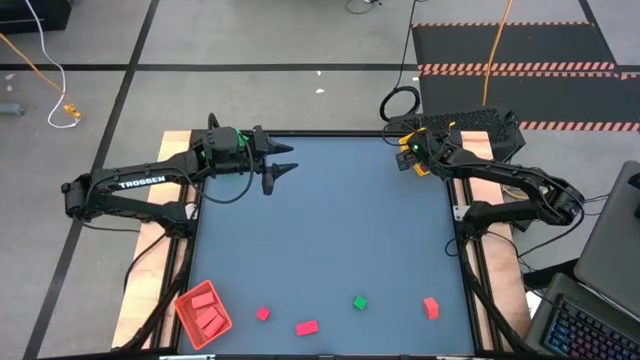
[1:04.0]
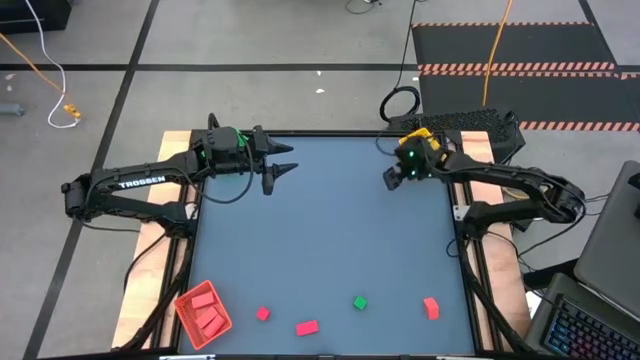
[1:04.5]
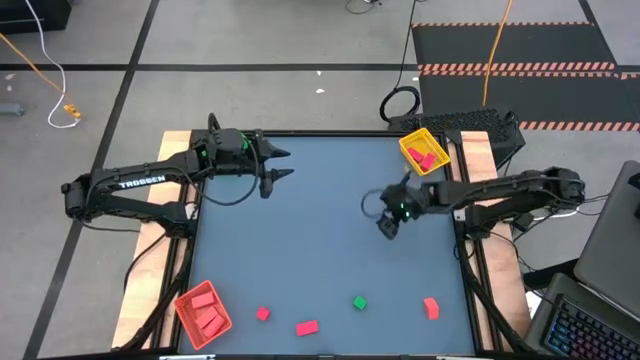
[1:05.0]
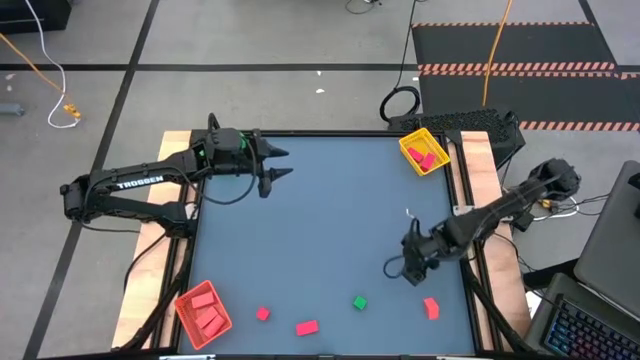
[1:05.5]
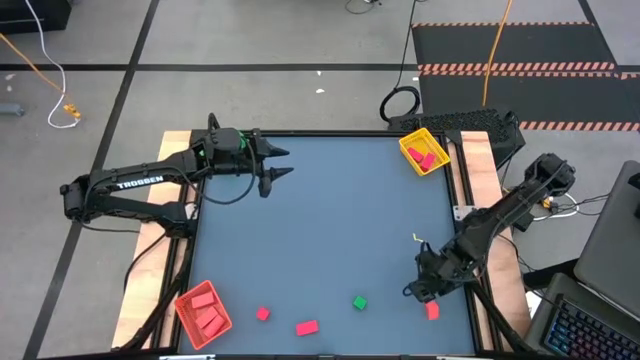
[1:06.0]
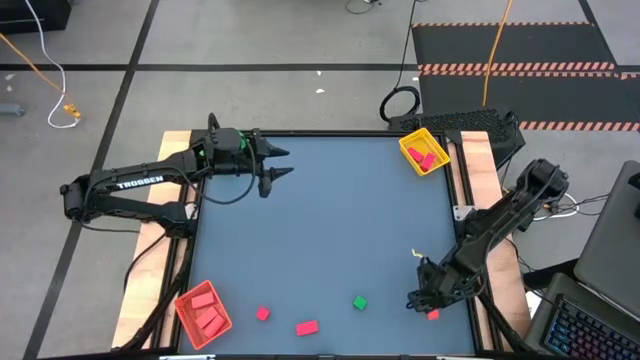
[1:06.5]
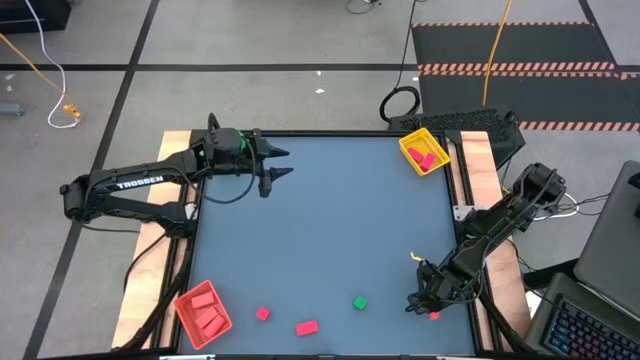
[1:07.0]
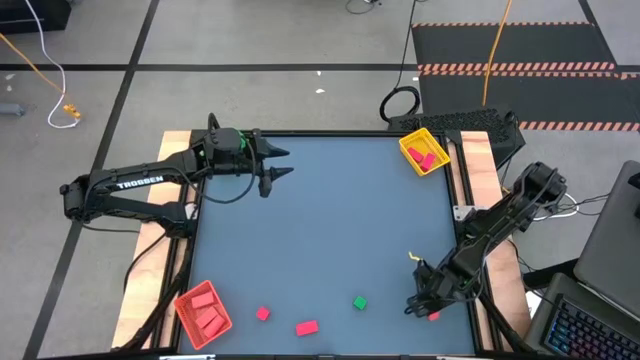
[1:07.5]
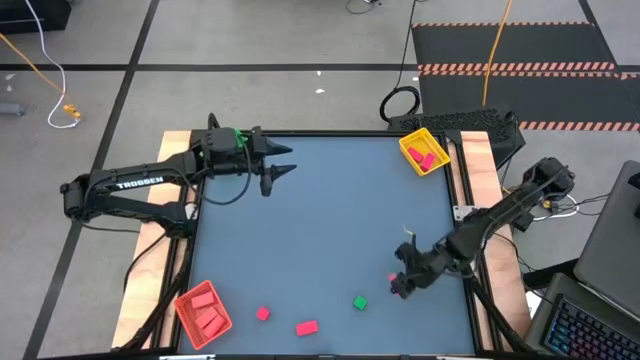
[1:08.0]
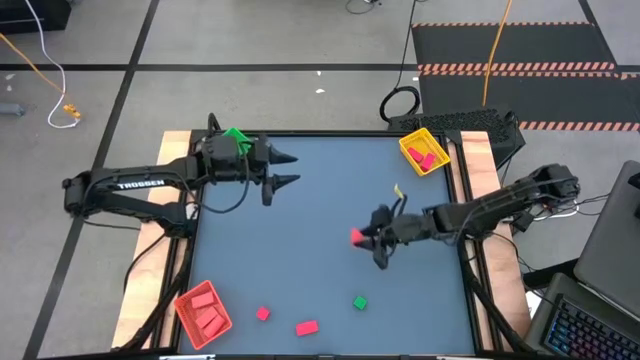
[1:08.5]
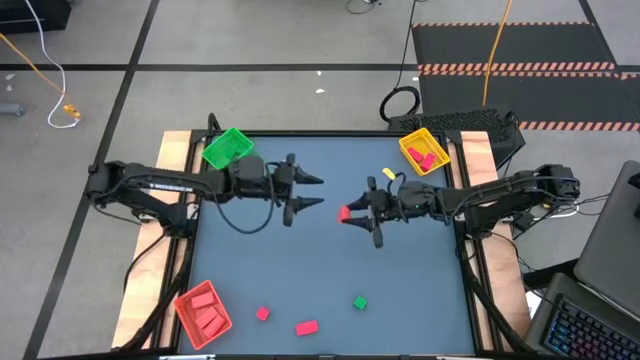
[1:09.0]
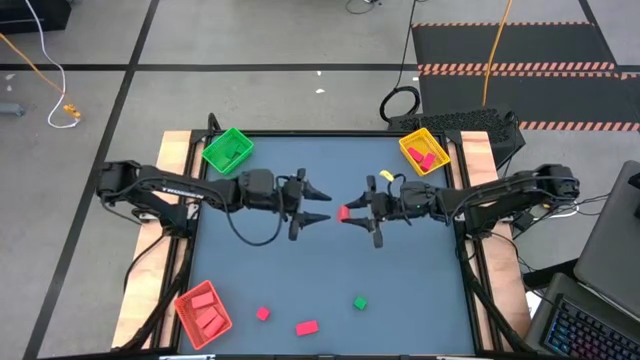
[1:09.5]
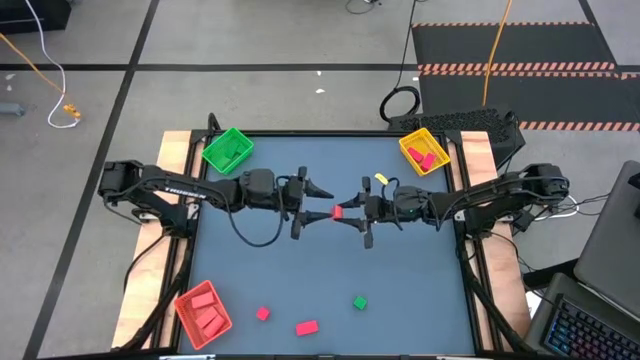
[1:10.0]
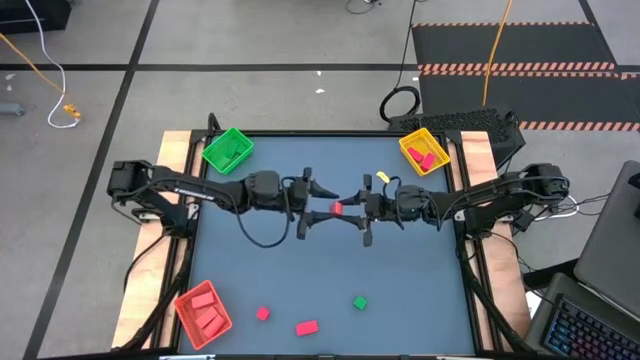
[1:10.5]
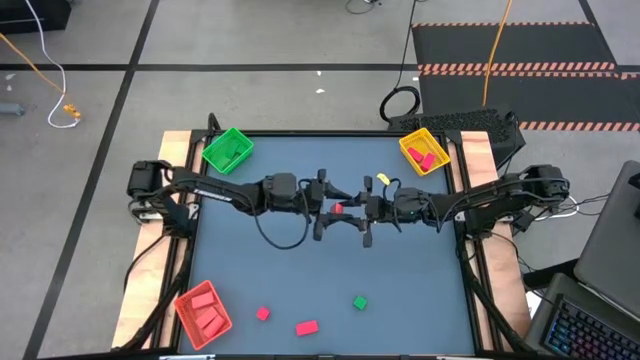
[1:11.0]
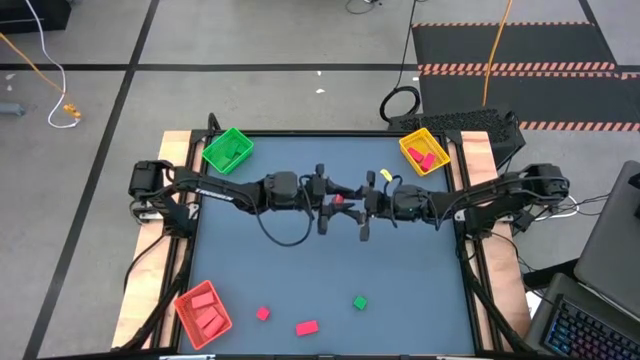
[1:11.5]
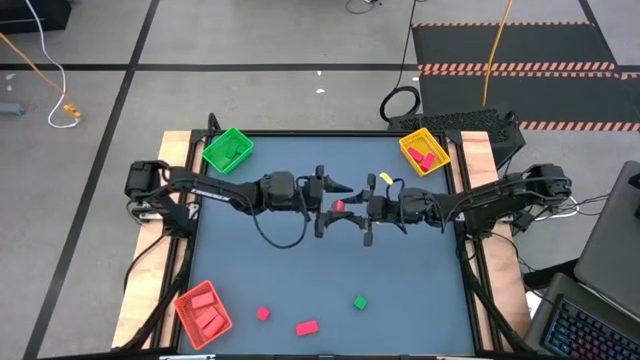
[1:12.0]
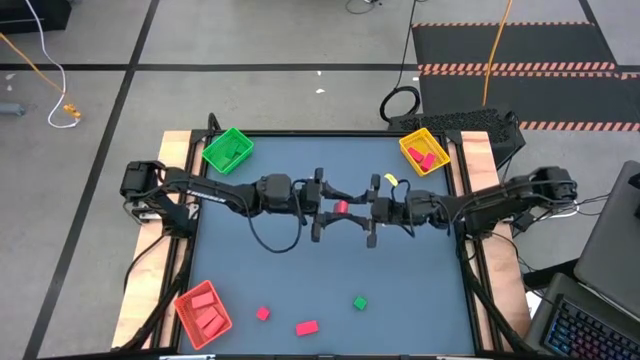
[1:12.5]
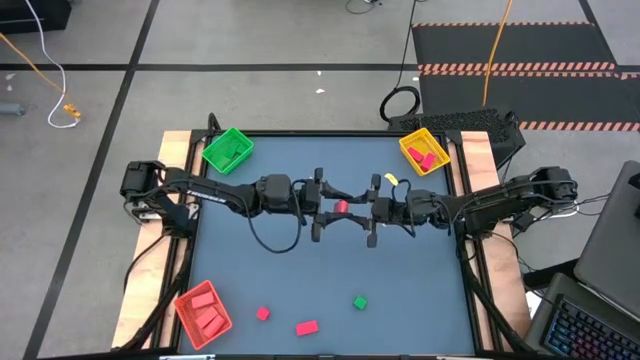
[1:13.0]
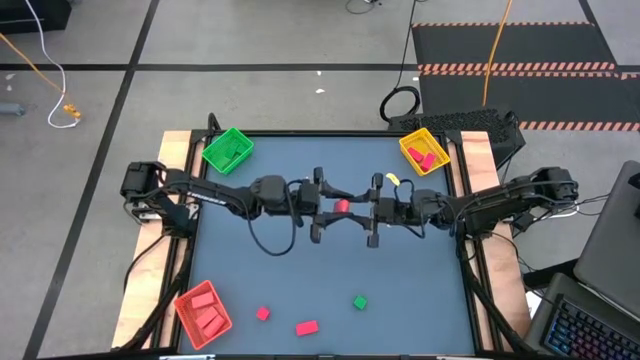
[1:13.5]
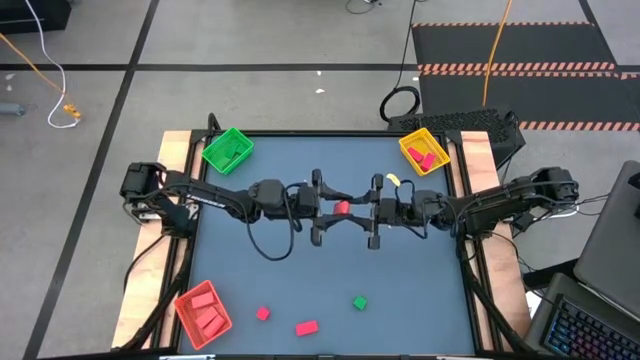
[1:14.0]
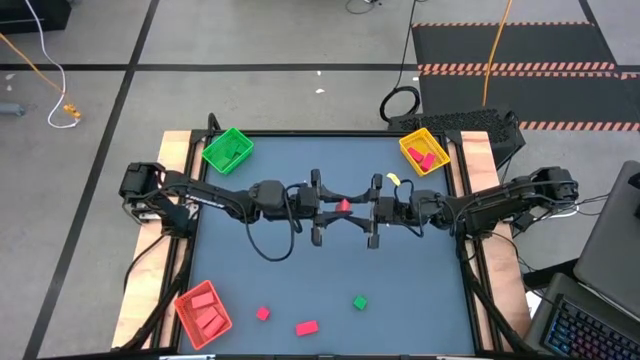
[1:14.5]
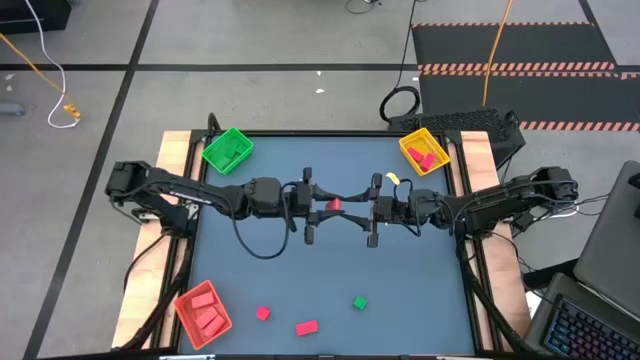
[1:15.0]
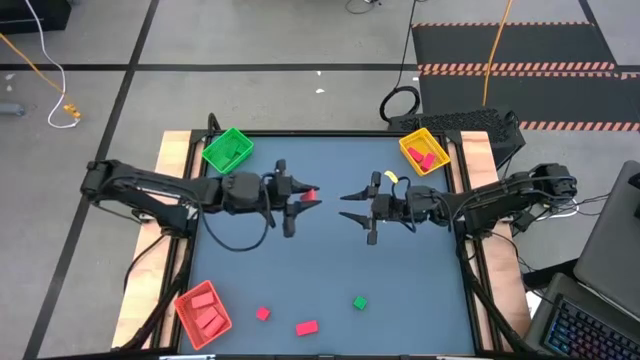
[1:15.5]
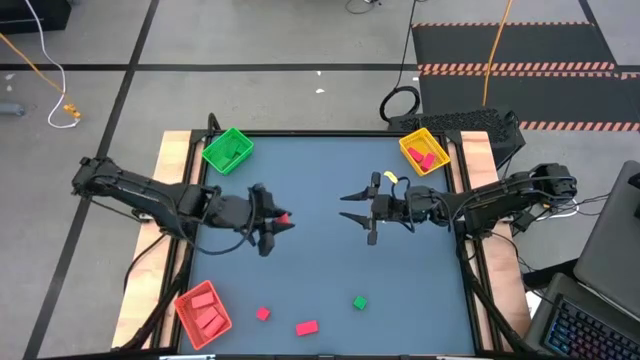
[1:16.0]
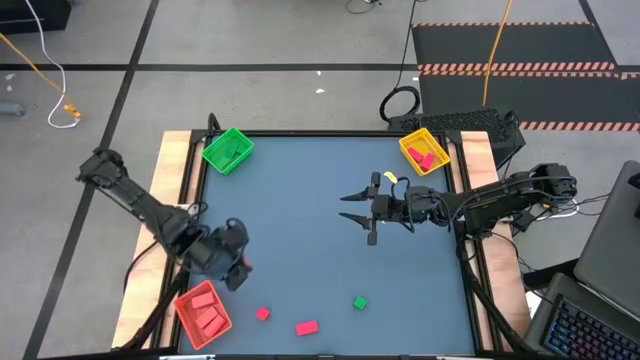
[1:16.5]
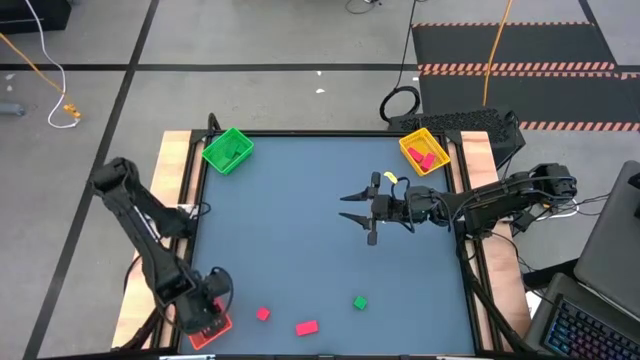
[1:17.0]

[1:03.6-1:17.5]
Task: Sort & place blocks by color
Put the orange block into the orange bin

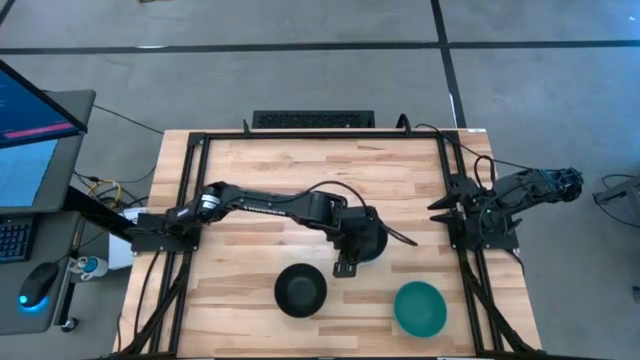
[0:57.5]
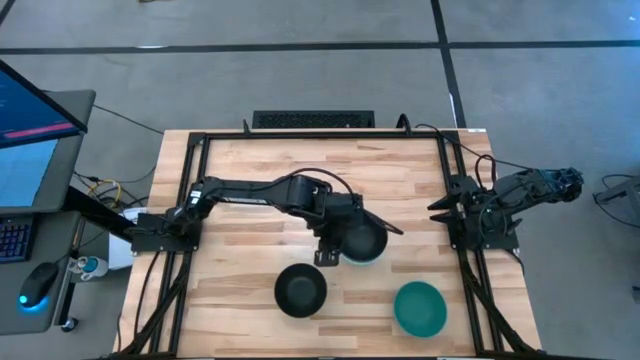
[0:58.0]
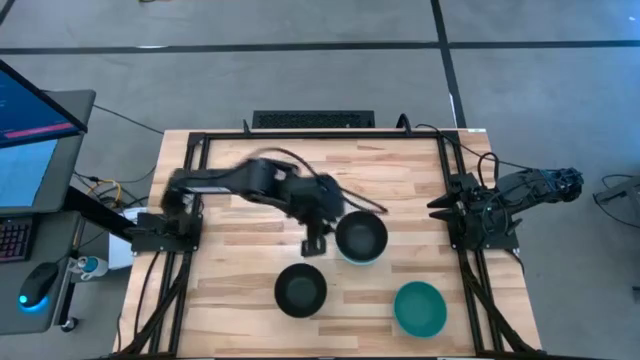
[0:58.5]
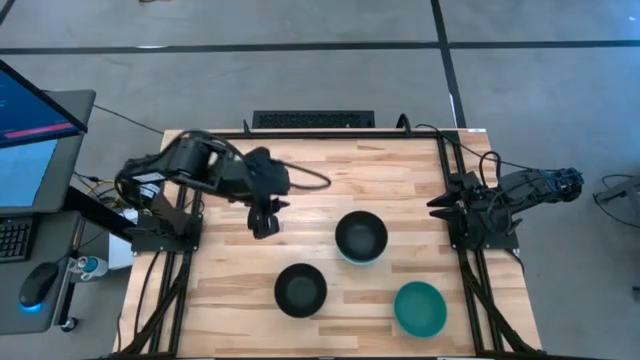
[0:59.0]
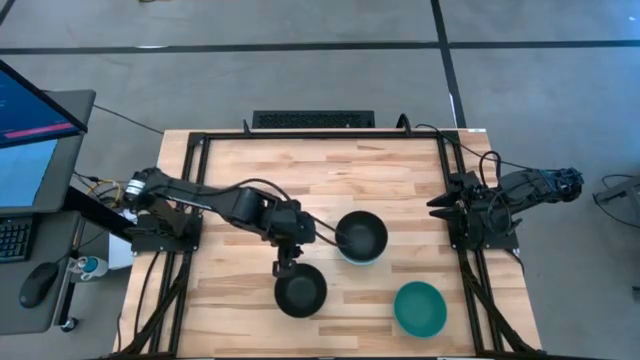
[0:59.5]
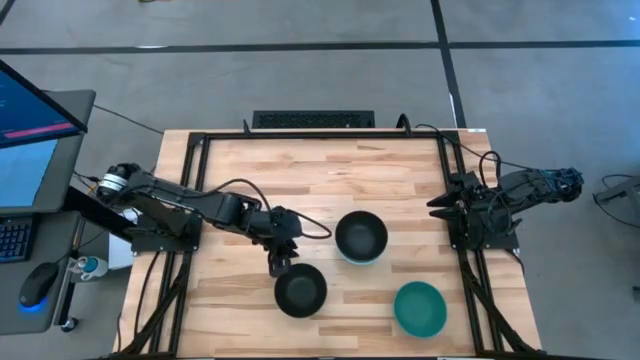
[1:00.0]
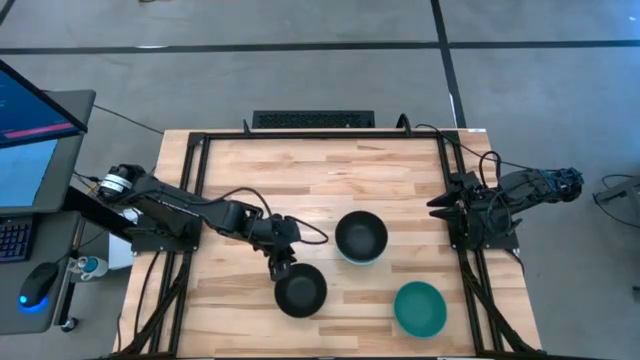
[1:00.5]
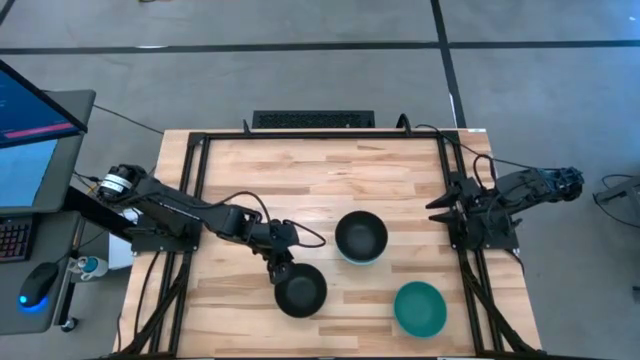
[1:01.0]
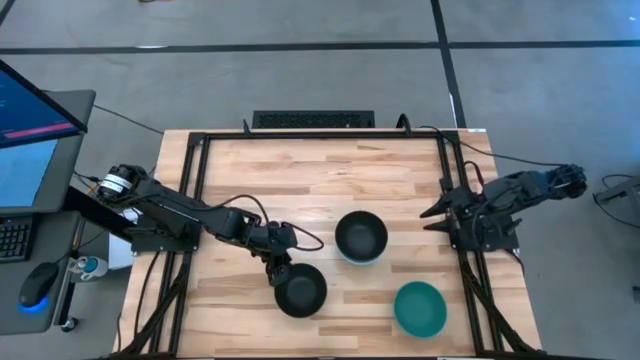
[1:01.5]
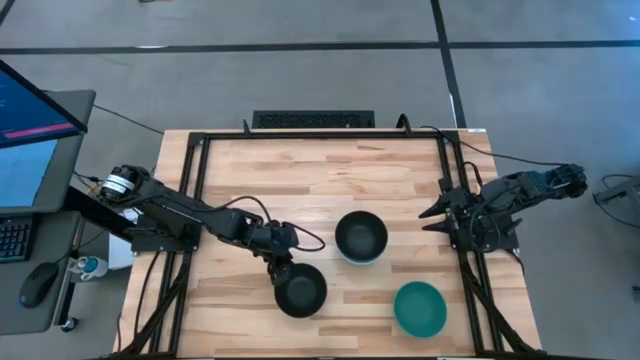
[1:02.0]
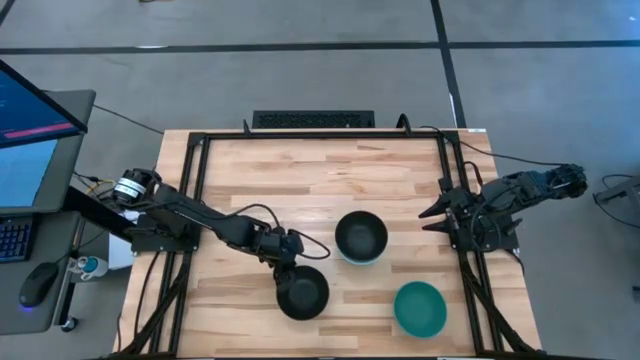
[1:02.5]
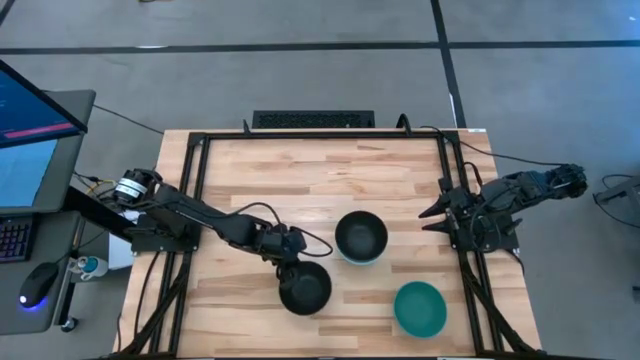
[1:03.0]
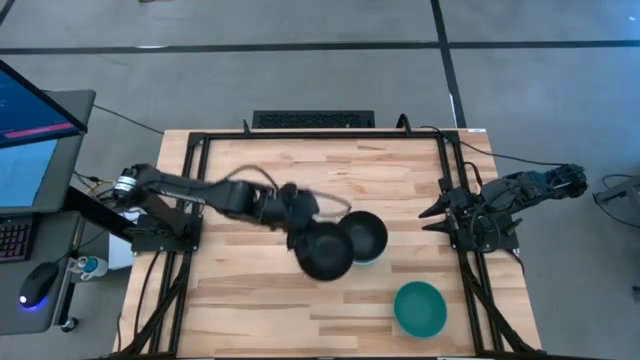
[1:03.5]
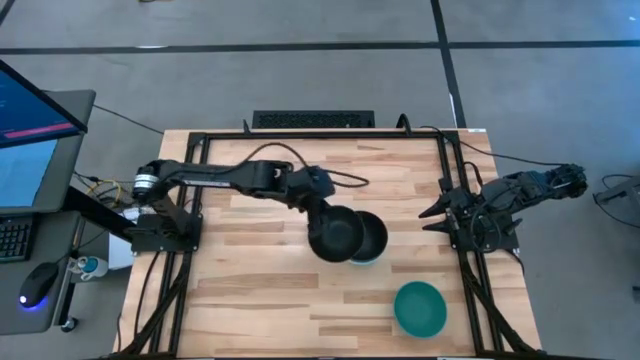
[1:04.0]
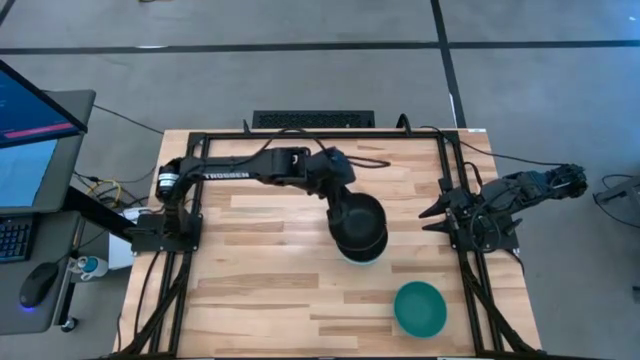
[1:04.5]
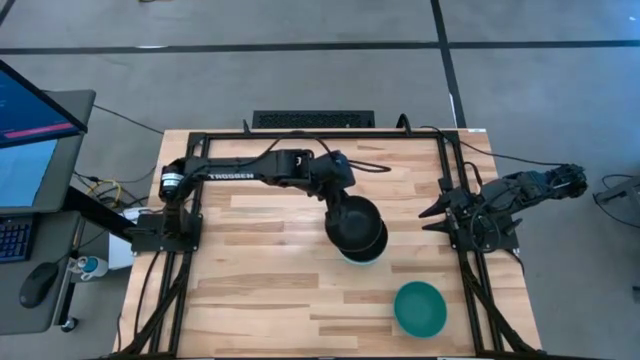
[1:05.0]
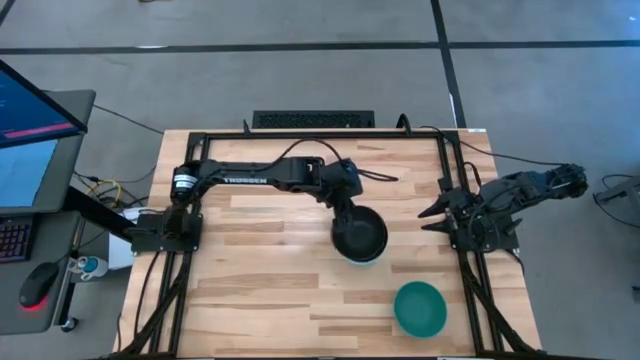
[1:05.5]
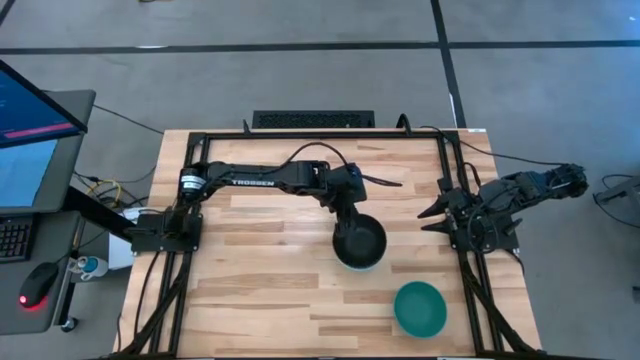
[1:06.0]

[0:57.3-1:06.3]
Task: Nest bowls inside each other
Stack the black bowl on top of the black bowl
